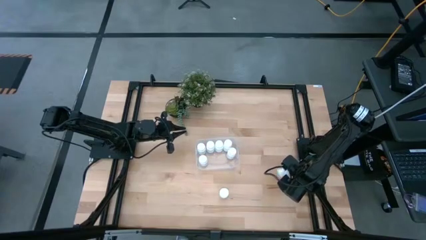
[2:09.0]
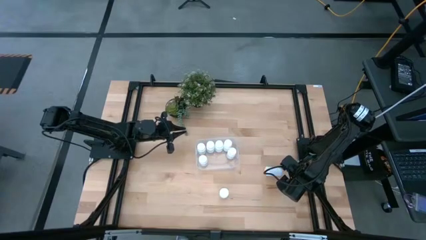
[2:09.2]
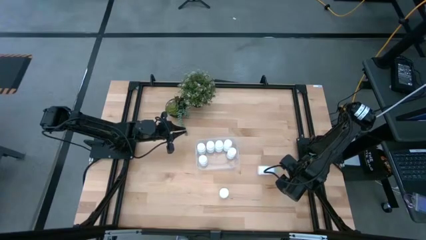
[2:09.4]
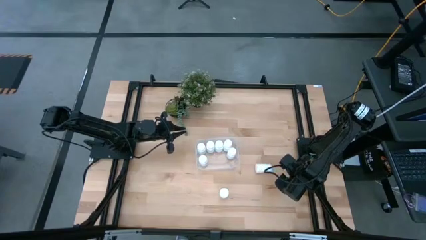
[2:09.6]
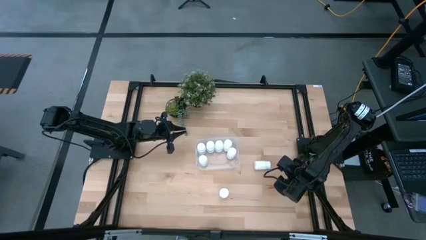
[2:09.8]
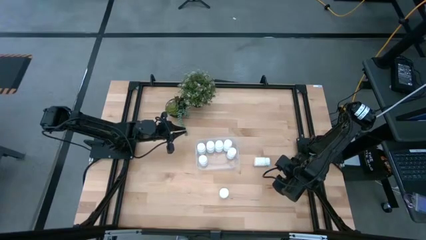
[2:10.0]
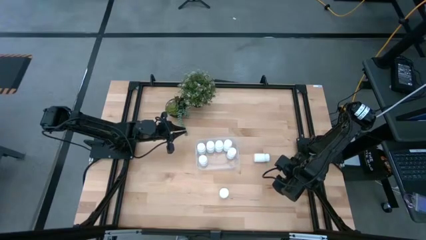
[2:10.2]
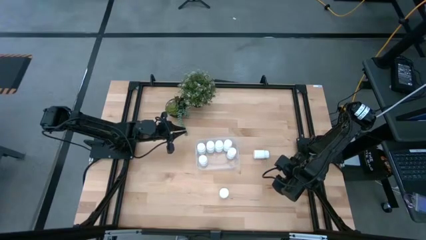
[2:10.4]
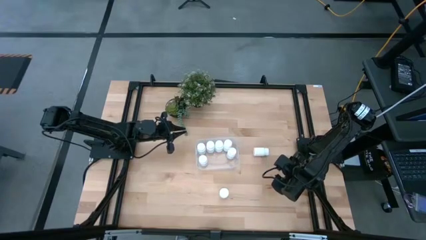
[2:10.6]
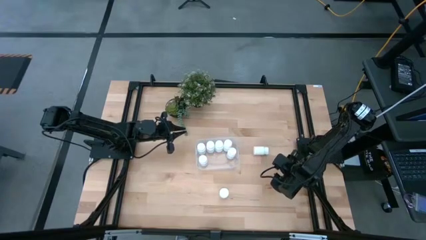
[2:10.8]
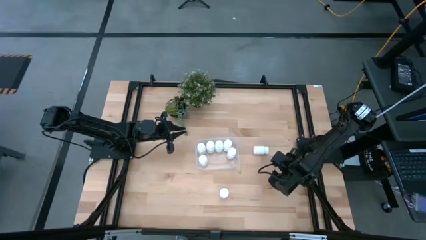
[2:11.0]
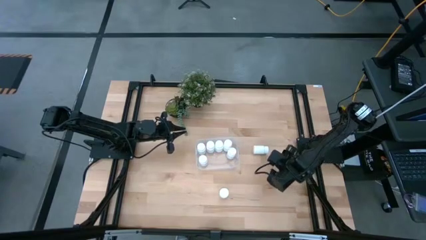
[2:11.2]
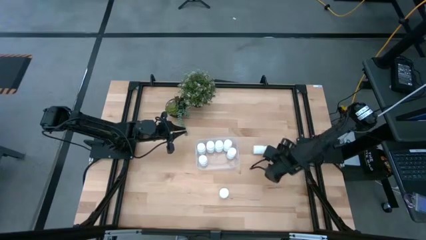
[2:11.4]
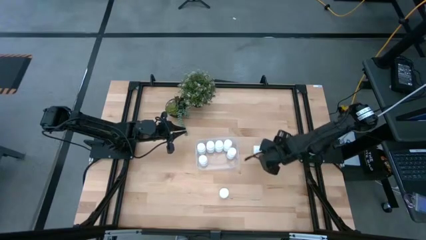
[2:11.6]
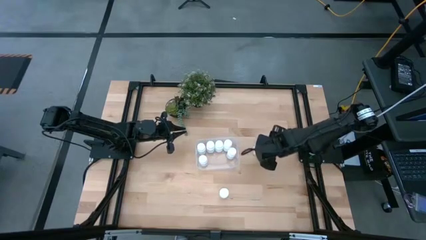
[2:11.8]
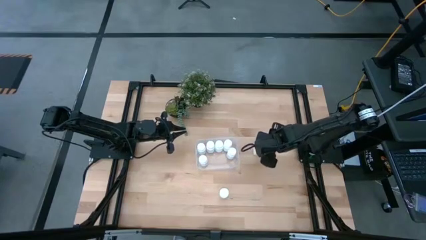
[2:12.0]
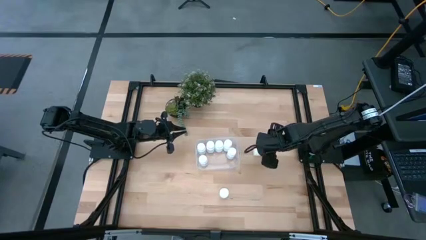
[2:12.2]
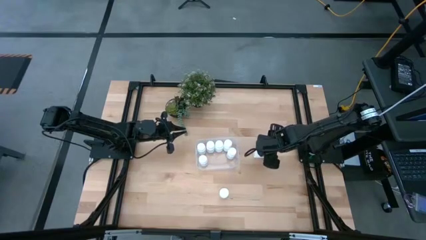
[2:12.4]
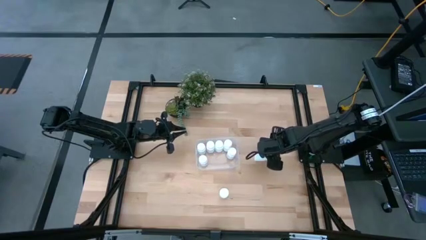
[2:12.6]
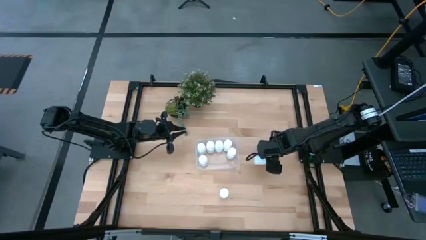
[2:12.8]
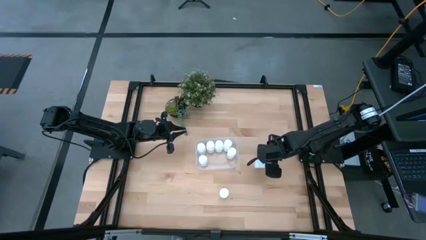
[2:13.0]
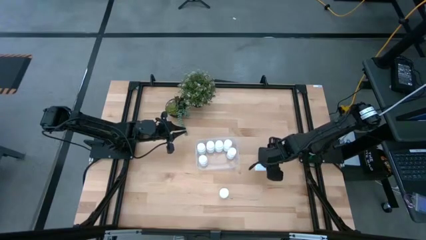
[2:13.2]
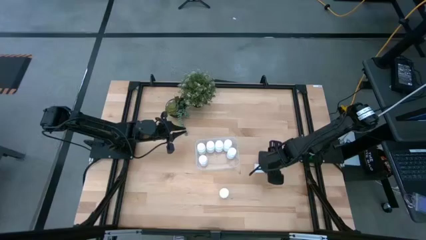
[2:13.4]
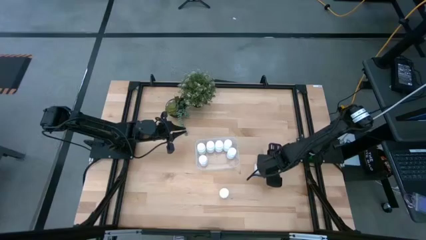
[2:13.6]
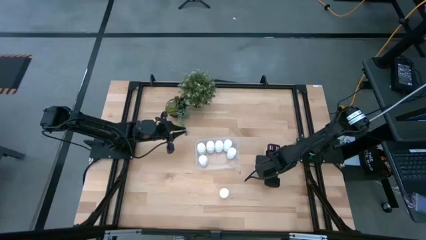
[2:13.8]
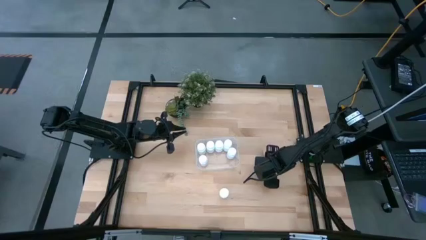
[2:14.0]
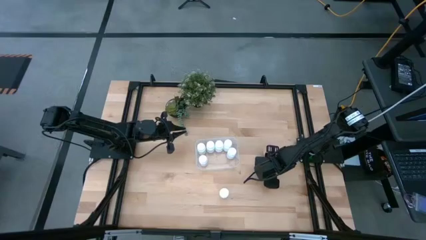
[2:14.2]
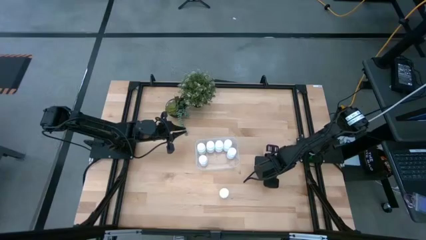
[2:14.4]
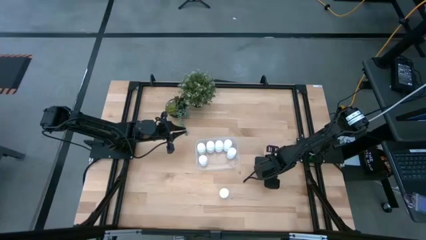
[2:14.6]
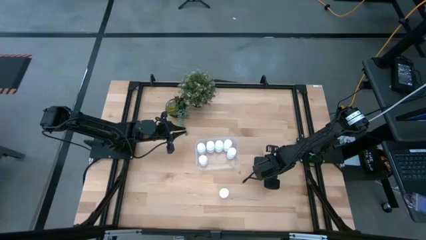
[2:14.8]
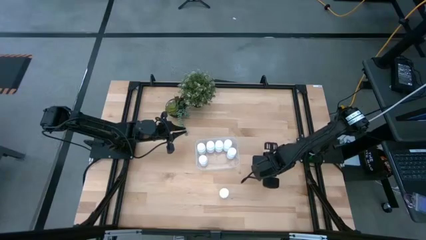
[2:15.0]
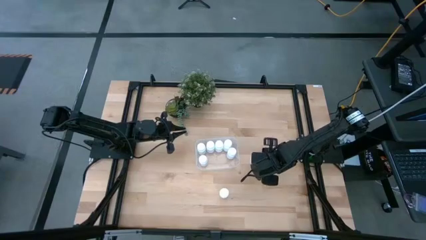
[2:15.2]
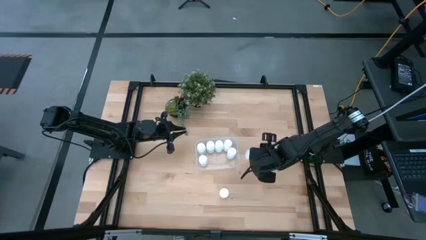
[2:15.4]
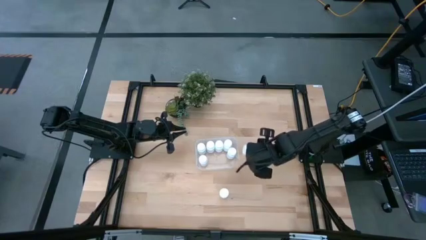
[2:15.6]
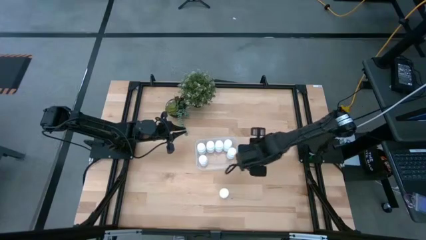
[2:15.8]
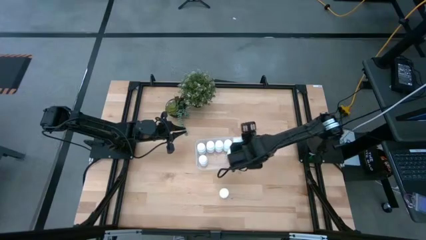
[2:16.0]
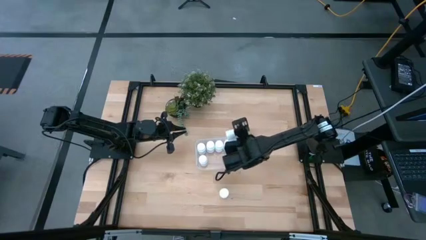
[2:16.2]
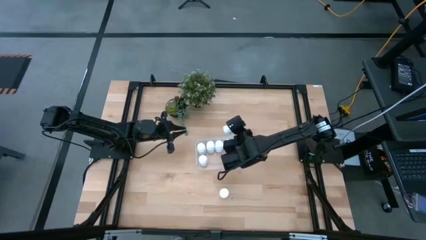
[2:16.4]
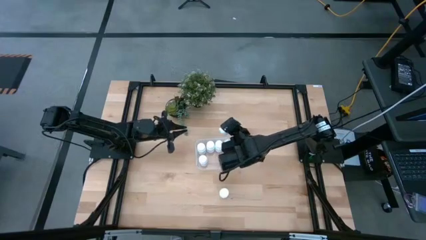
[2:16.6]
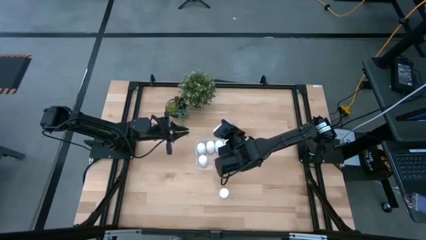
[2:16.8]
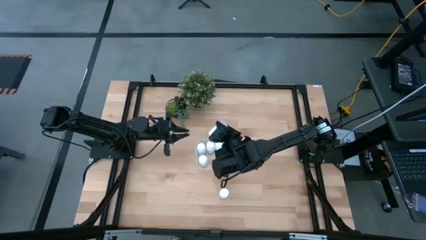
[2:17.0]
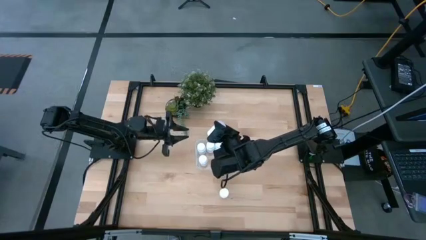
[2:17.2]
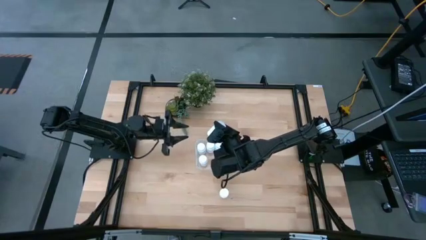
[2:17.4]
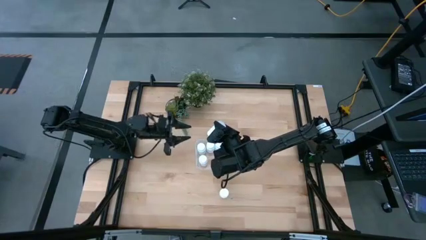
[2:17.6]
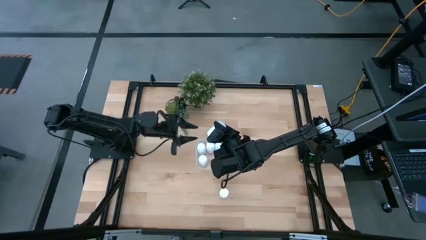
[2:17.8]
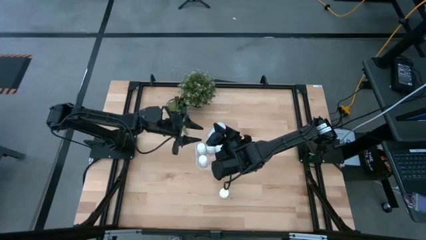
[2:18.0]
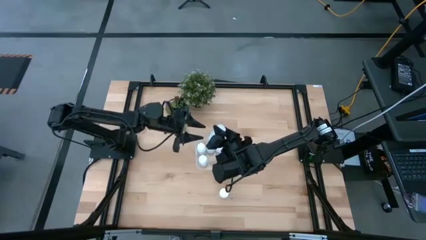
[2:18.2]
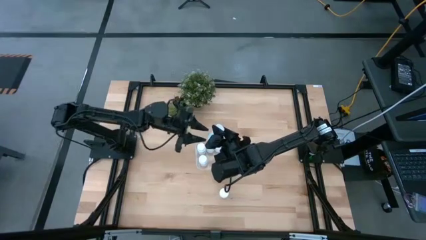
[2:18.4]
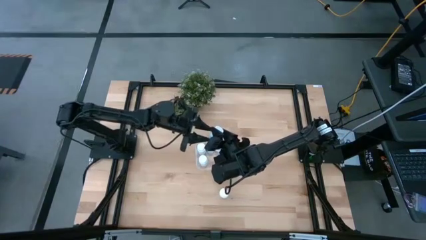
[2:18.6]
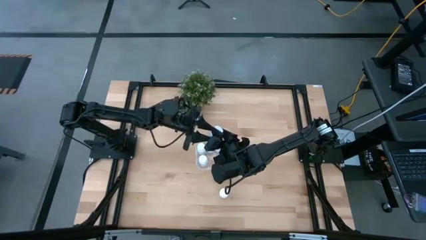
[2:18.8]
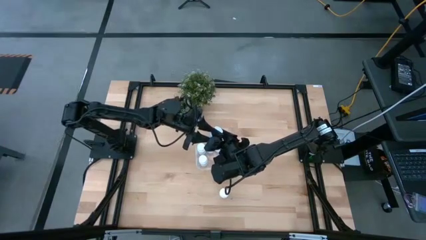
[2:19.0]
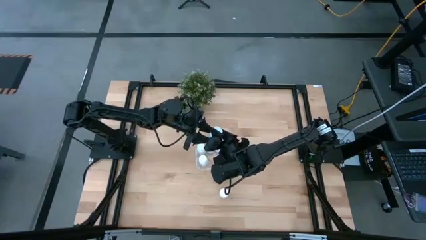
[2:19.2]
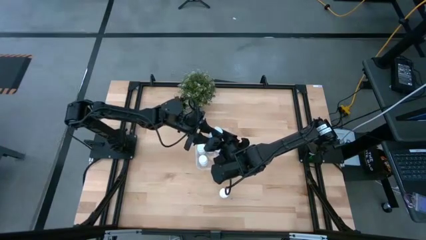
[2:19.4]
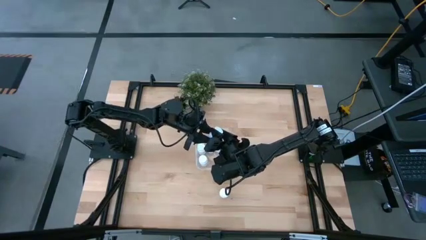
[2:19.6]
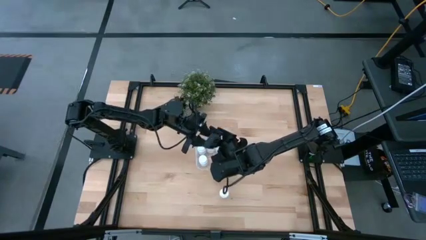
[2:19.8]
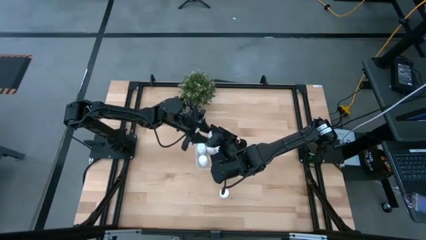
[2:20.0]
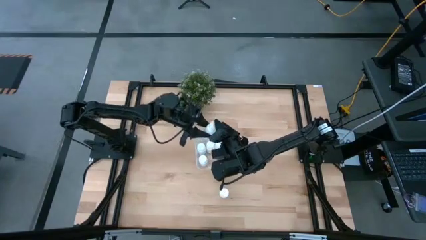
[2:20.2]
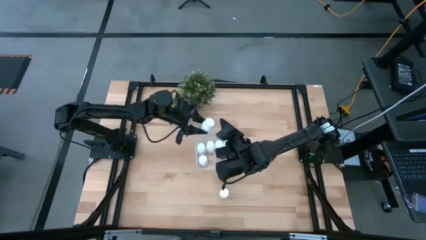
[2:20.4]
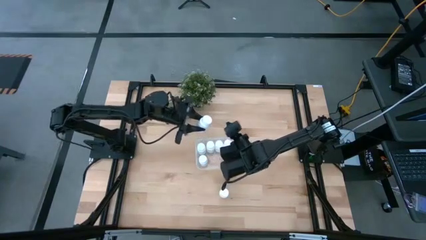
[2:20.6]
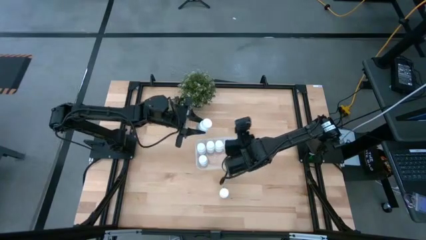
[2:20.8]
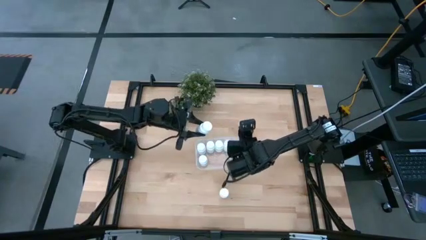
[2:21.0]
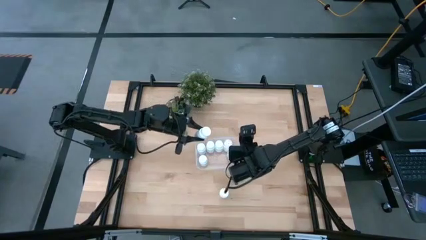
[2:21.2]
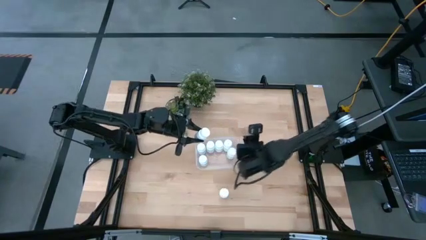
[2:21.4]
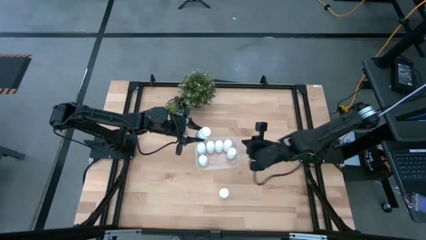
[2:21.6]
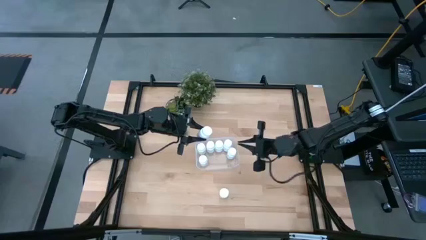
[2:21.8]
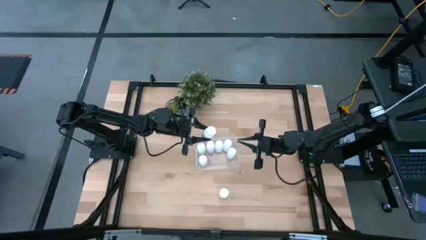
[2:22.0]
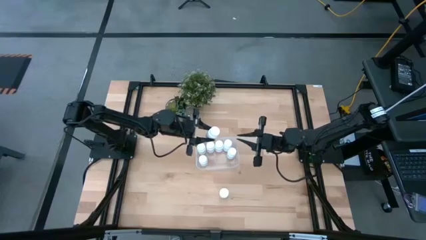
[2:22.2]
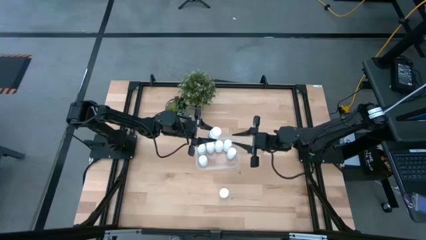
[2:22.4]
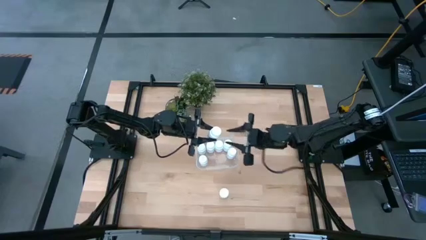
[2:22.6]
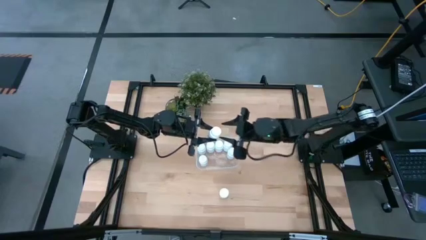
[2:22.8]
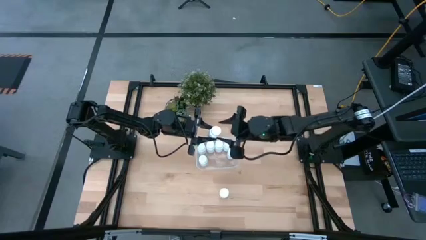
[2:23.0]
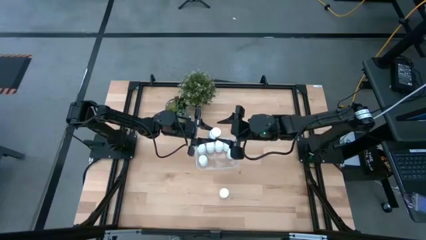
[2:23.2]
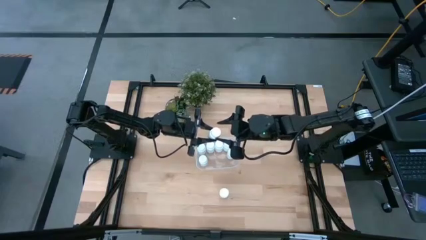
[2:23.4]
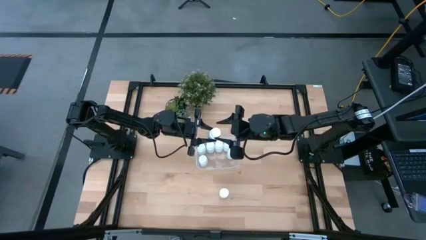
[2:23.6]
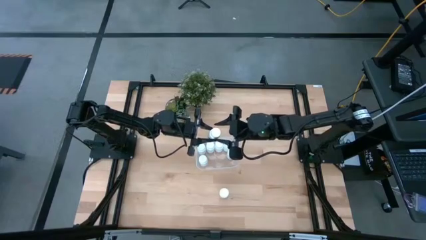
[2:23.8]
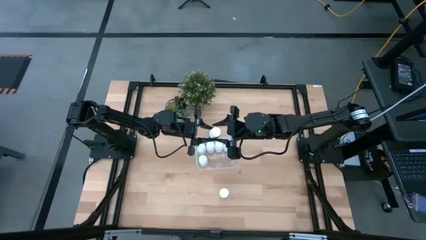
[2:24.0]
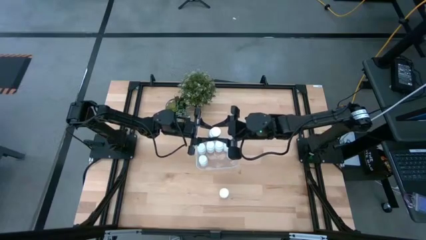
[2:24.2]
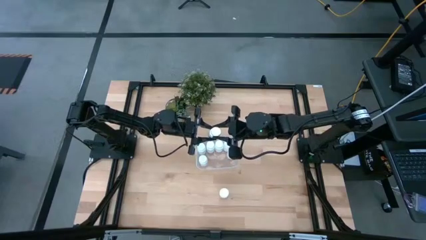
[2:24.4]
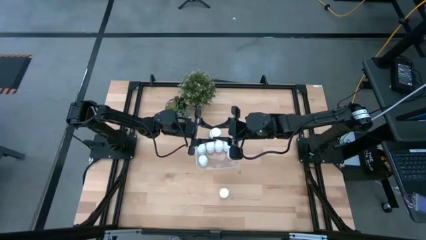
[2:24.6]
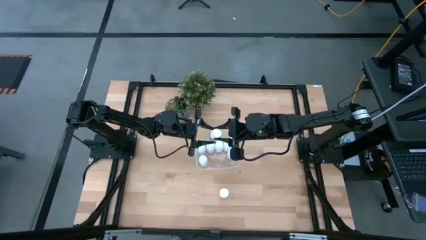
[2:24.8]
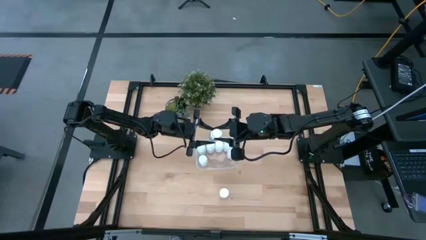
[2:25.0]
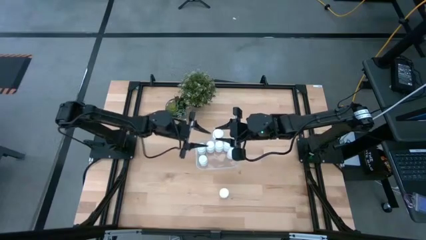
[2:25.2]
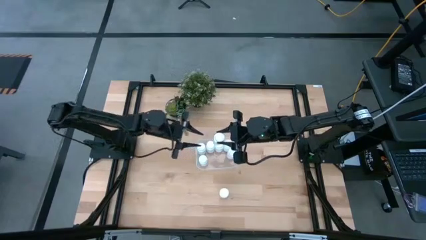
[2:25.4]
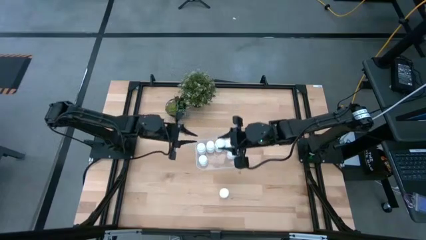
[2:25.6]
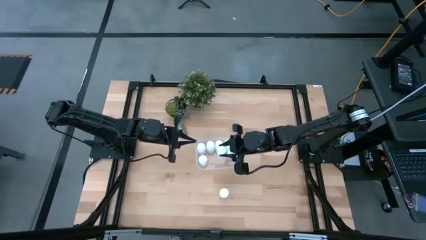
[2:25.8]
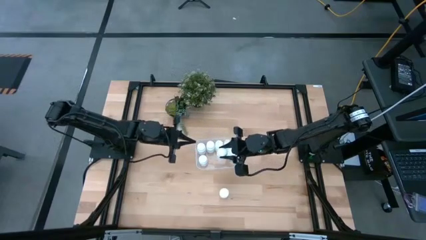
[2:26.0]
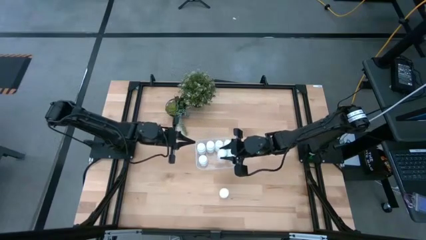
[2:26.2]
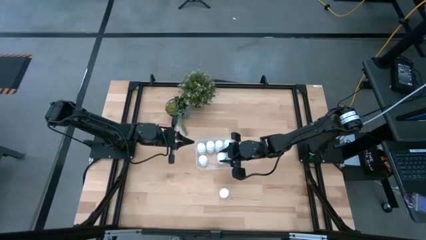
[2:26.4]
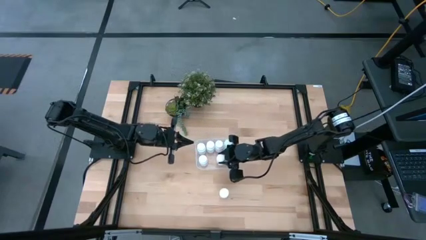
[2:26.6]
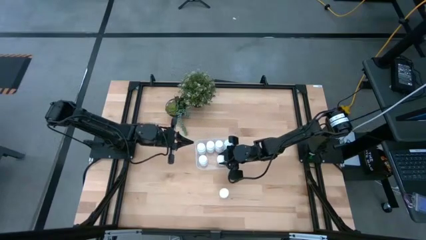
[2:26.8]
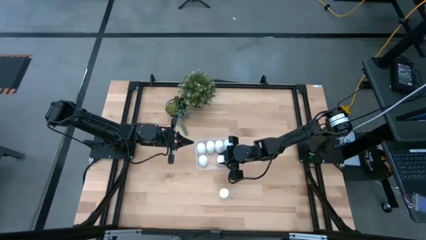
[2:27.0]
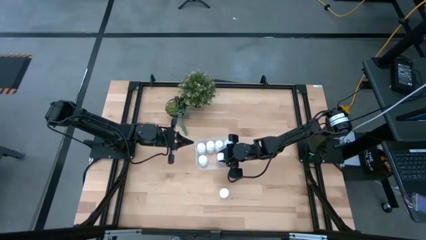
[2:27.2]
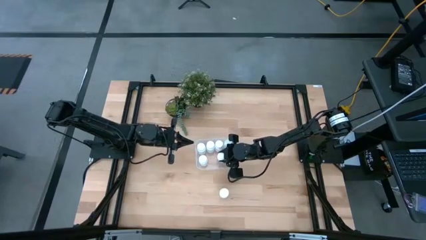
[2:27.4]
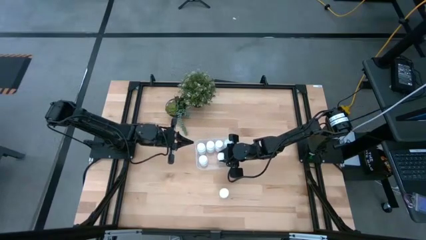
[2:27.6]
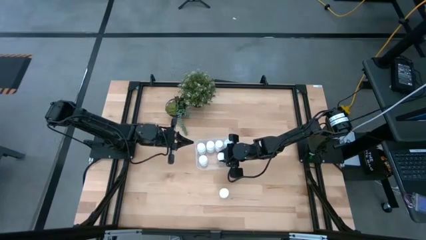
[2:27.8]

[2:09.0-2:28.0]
Task: Pick and place pill bottles into a basket
Put the right pill bottle into the bin
